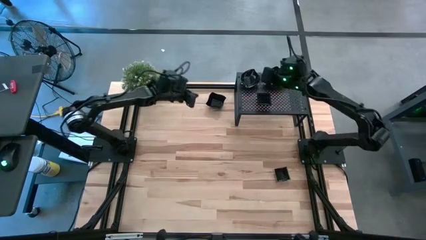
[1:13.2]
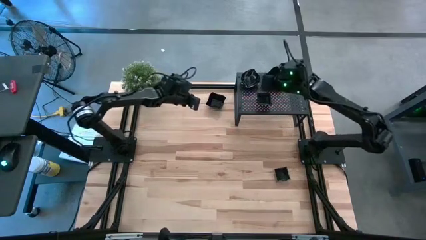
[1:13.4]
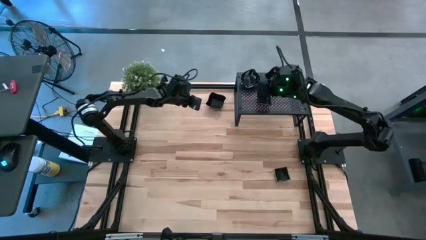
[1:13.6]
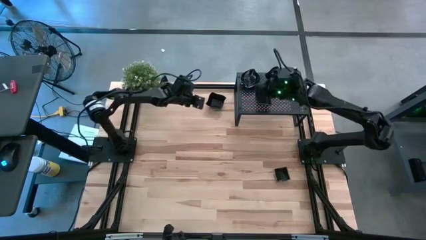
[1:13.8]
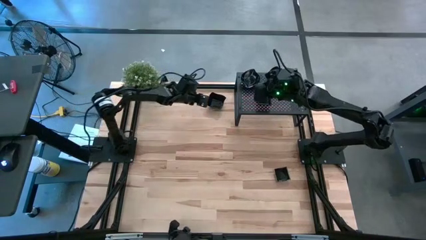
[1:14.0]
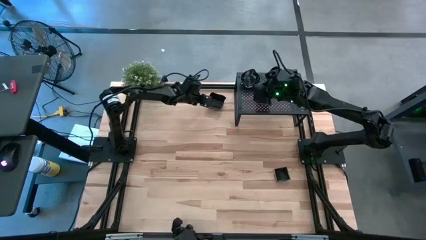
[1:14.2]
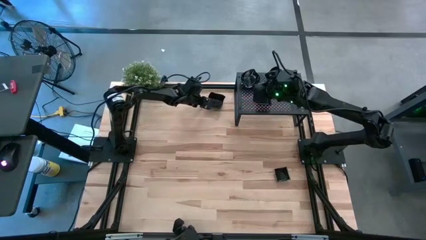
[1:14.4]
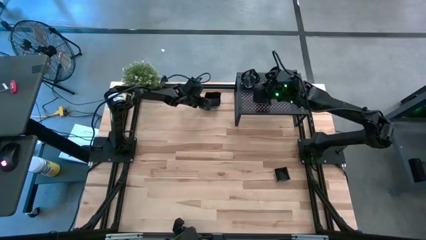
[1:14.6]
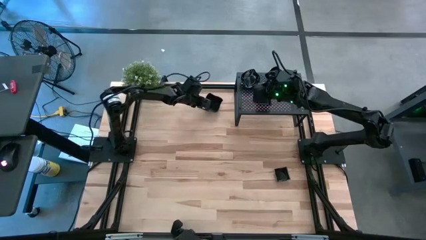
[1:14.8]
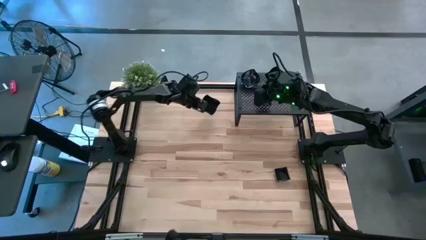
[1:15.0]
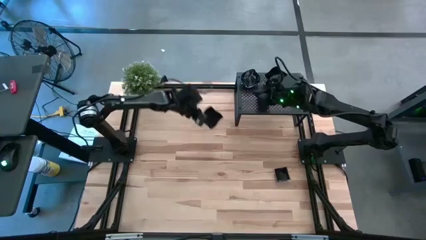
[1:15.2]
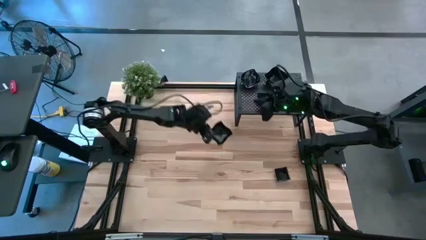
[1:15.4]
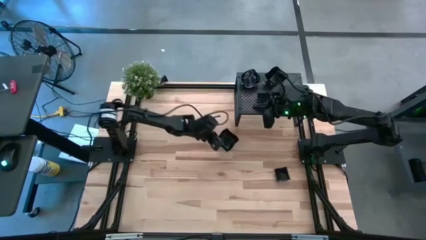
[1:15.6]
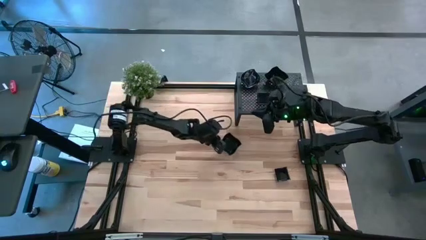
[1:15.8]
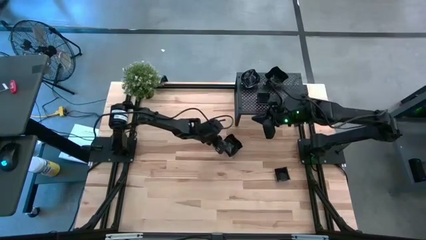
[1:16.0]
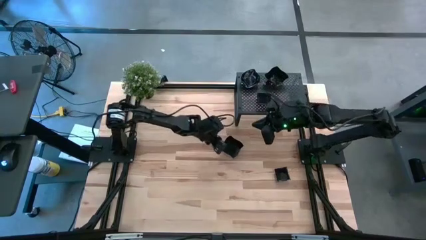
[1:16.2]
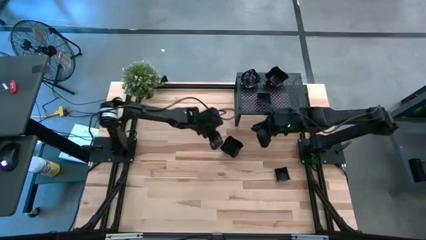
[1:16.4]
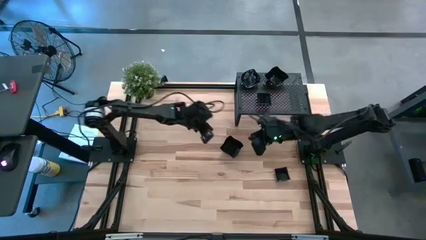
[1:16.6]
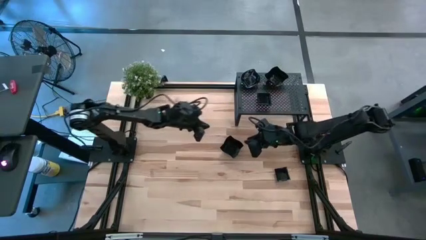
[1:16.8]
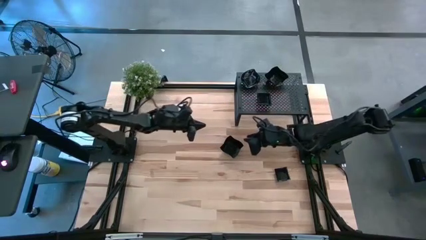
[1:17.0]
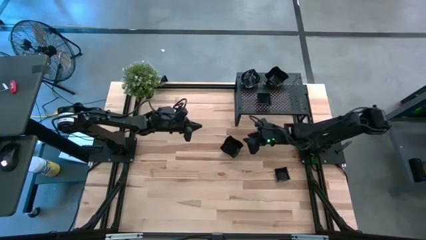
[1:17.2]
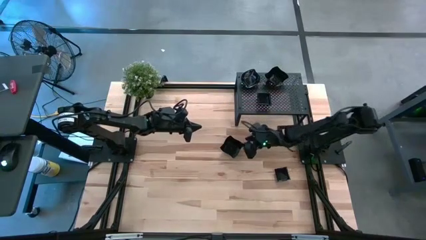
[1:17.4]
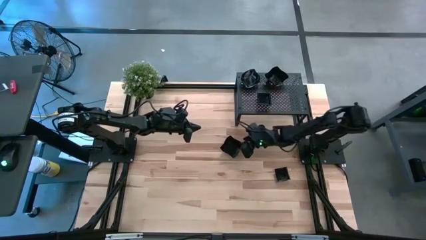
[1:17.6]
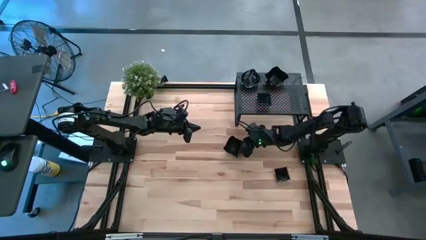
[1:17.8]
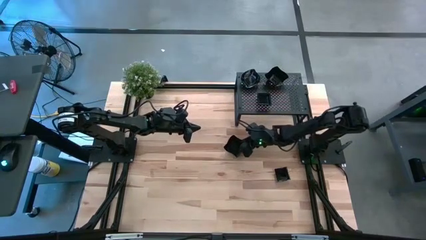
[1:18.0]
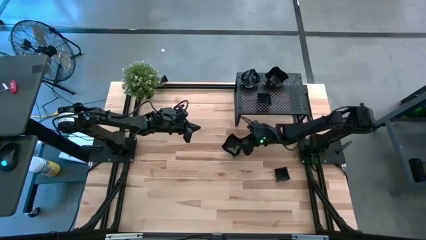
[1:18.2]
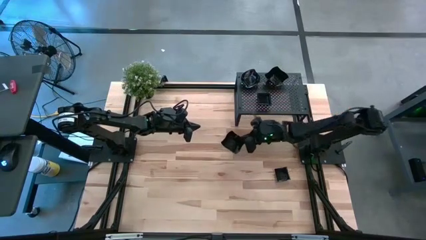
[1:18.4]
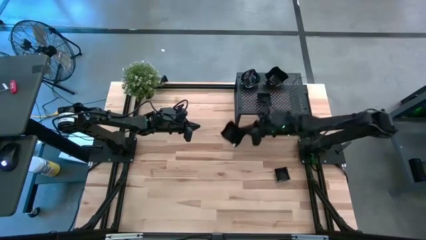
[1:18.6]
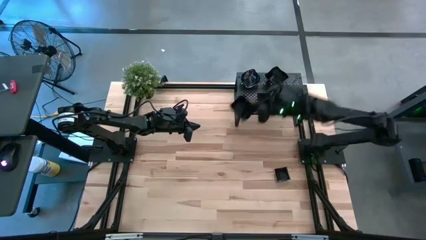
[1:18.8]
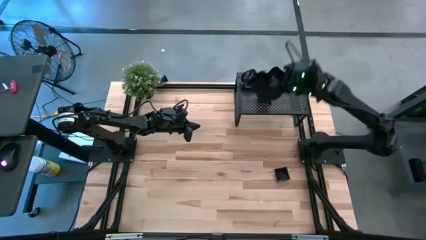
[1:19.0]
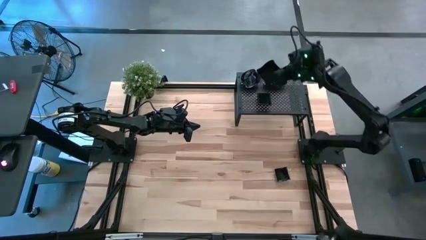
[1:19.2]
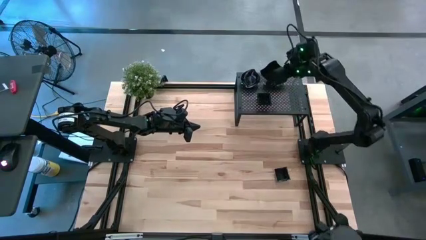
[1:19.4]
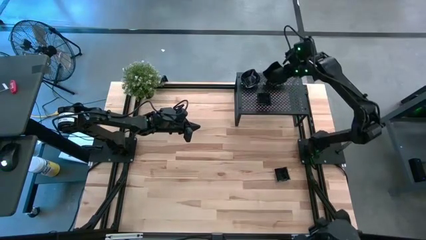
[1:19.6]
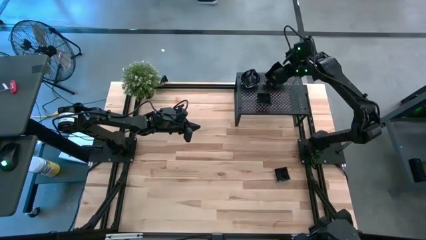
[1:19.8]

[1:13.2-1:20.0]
Task: Pick & Place Mini shaped plates
Stack the black distorted square plate on top of the black distorted square plate on the shelf

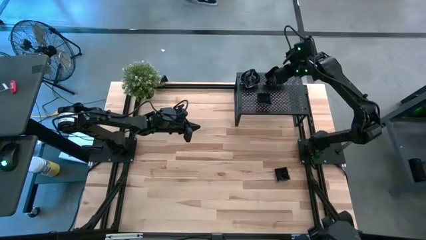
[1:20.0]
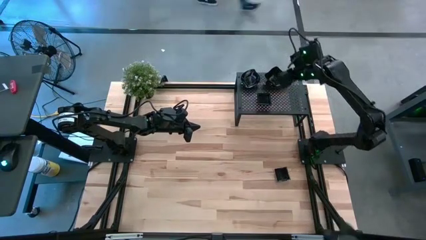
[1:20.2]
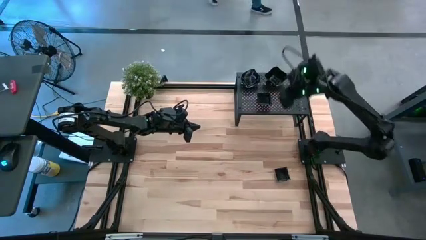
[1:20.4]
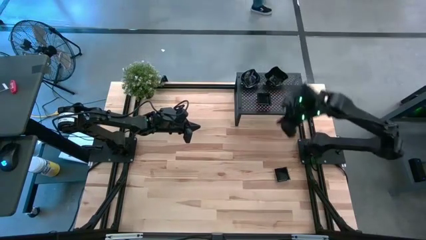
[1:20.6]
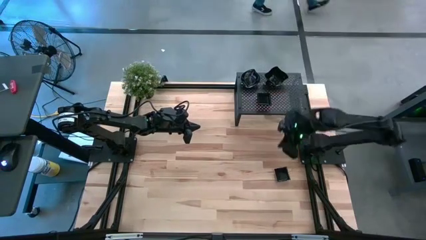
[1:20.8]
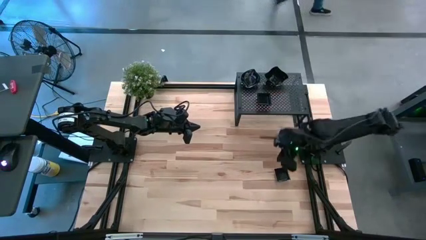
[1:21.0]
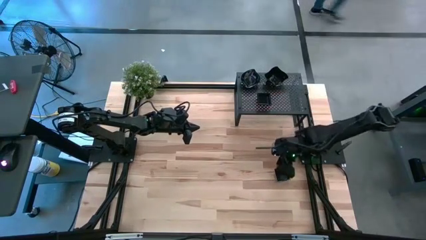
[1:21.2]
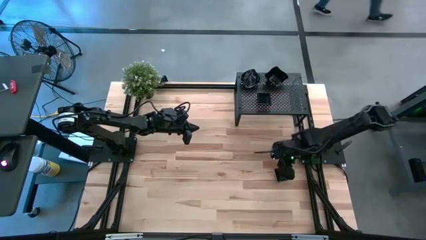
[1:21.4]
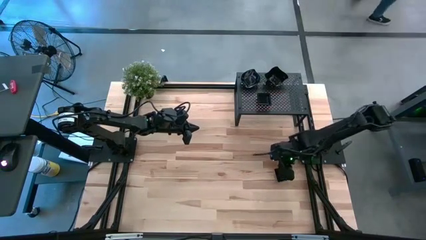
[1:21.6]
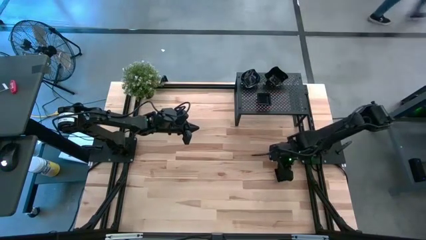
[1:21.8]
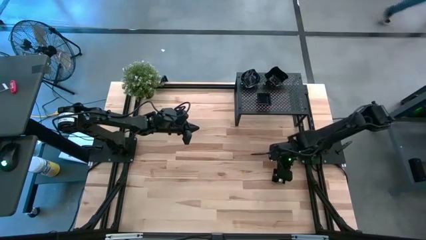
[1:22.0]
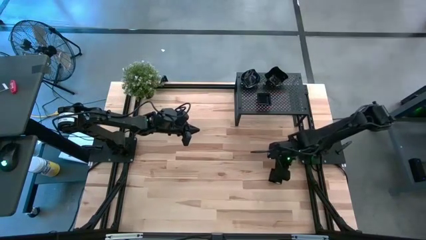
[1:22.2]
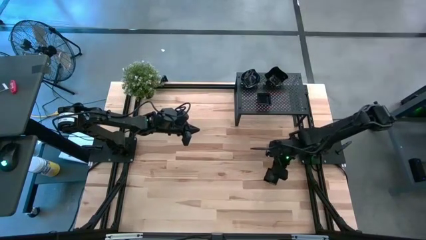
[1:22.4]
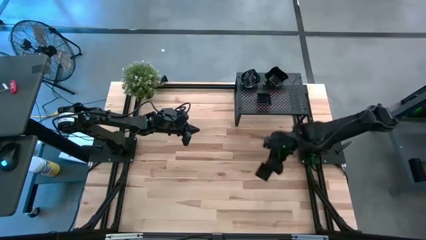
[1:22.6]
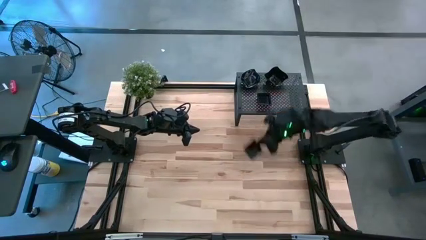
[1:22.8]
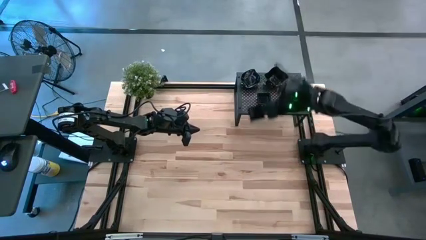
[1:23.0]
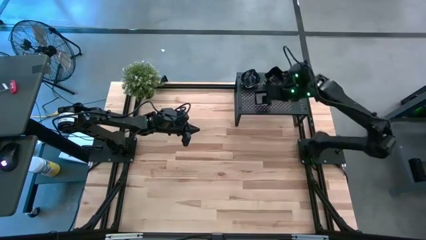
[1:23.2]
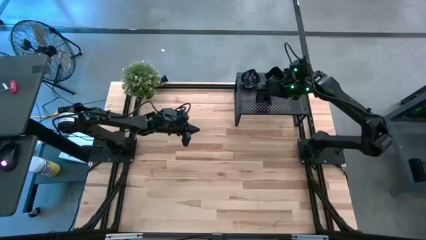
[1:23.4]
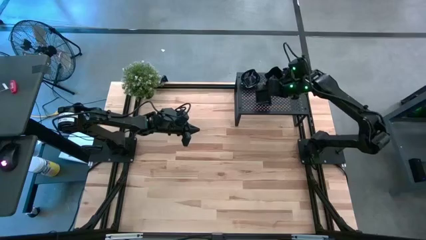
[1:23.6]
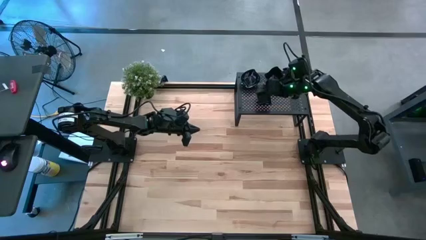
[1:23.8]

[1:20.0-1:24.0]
Stack the black square plate on top of the black square plate on the shelf

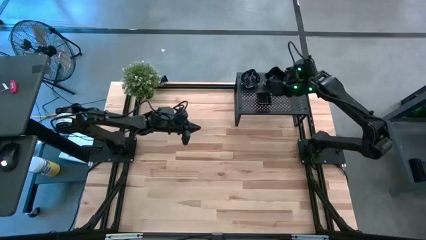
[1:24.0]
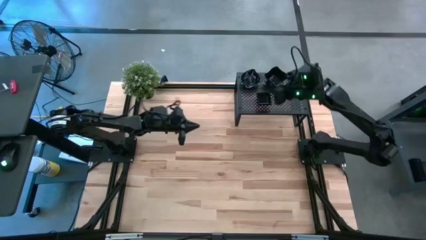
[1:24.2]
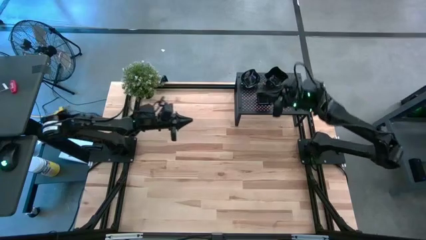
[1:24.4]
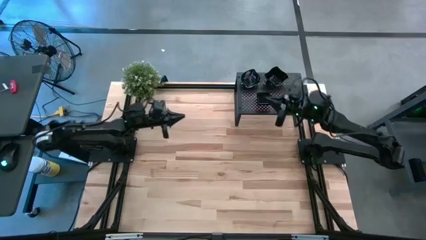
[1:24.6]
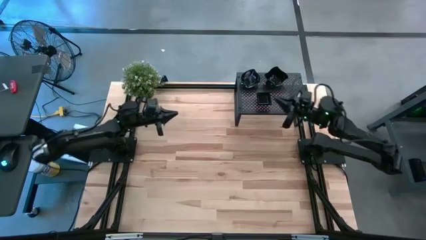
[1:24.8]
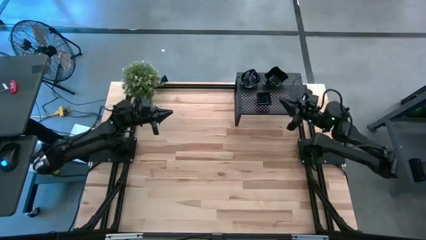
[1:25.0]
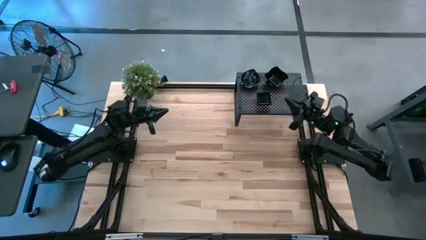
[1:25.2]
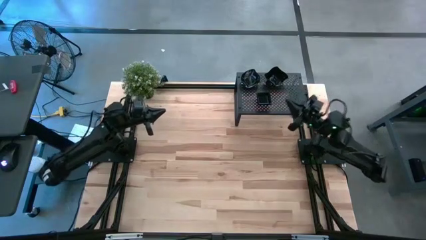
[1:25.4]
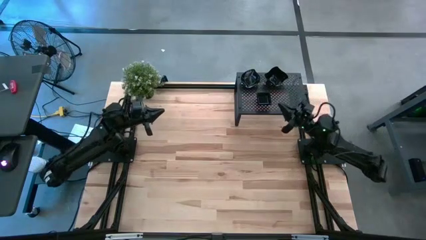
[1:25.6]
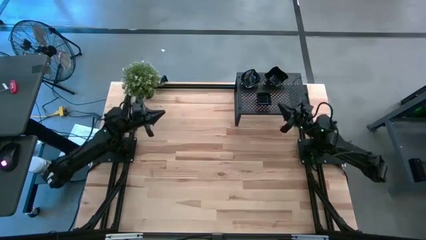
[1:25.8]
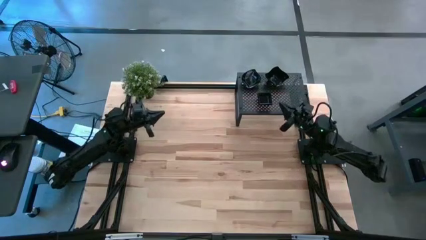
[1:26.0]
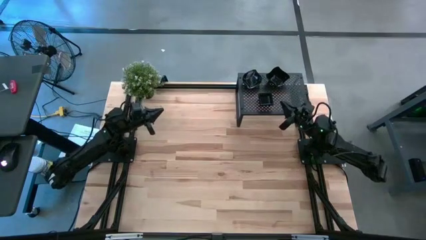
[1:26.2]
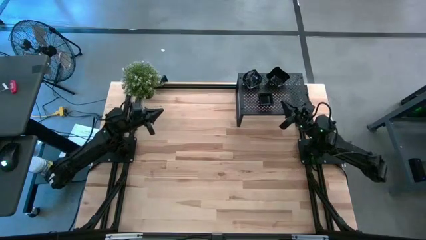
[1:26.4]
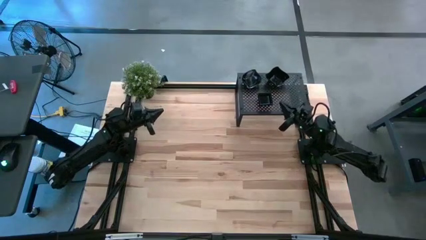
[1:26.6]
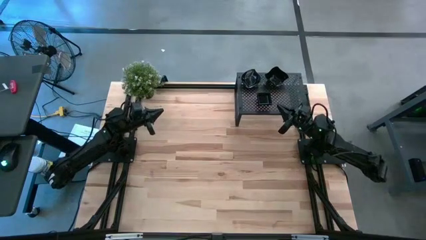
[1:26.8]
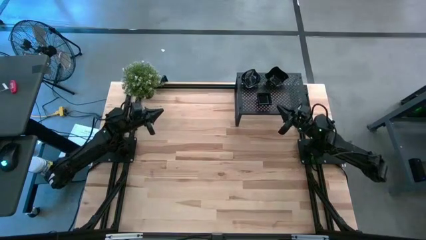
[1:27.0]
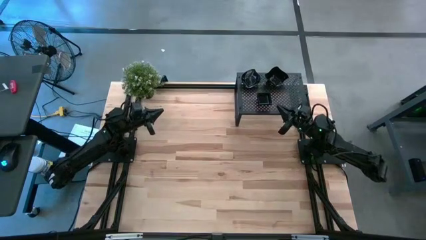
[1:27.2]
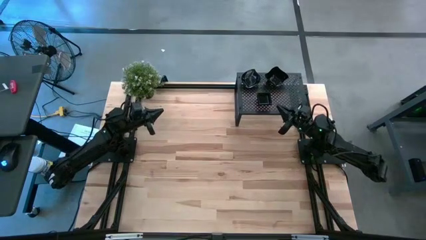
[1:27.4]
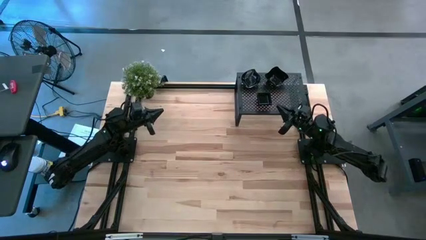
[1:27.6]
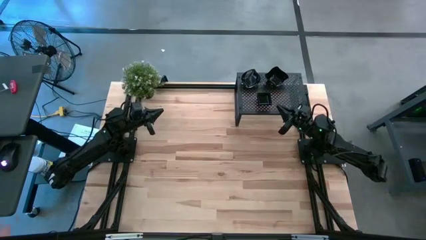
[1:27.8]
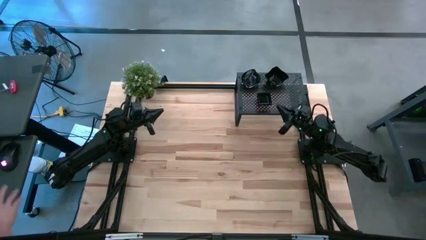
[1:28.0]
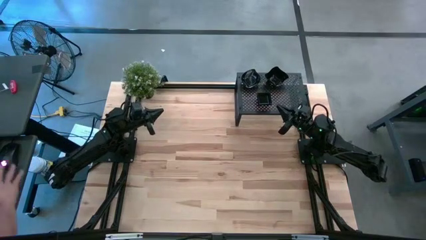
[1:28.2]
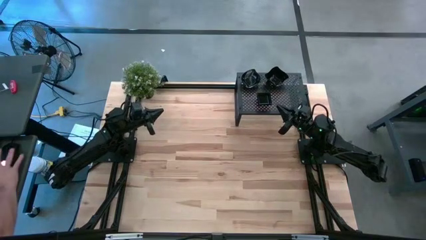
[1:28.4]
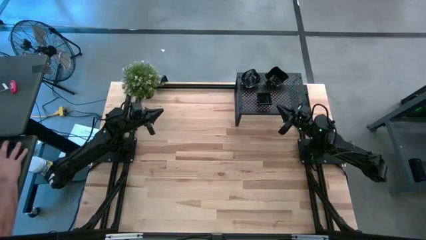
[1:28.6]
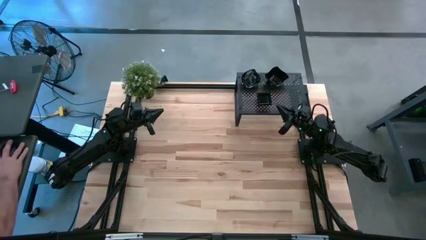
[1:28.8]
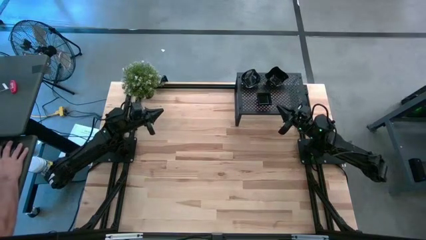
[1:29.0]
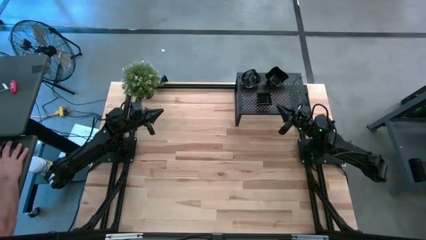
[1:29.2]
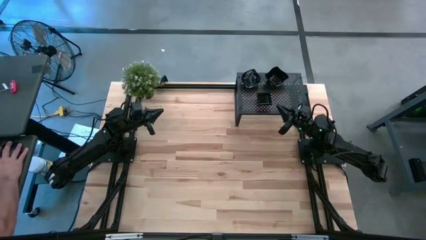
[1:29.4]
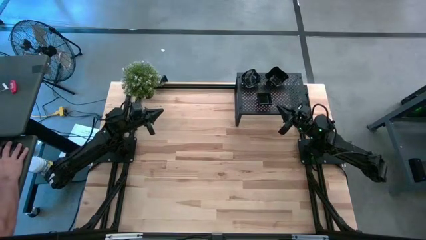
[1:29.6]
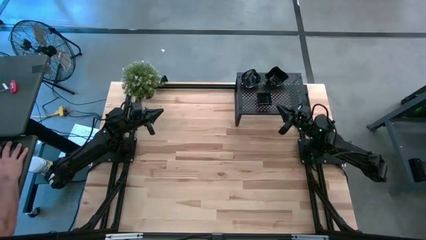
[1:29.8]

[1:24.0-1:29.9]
Return to Home Position
